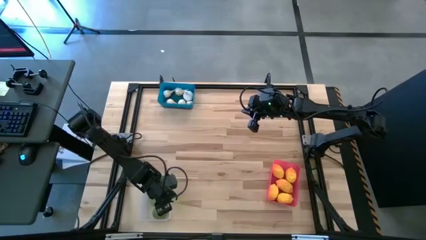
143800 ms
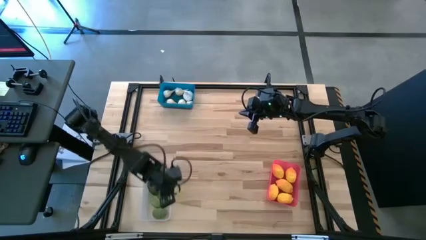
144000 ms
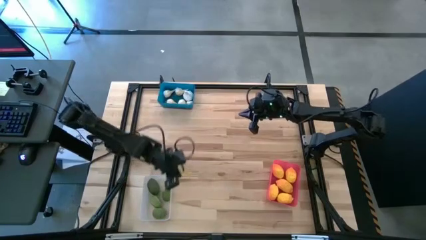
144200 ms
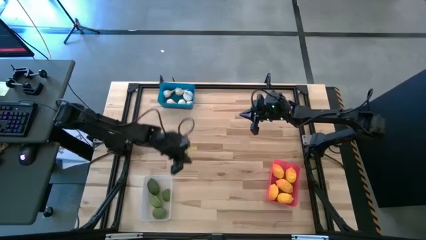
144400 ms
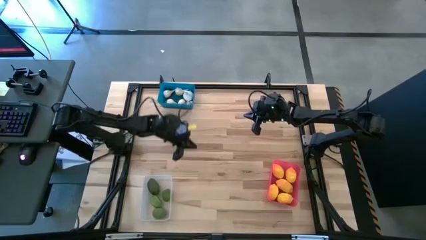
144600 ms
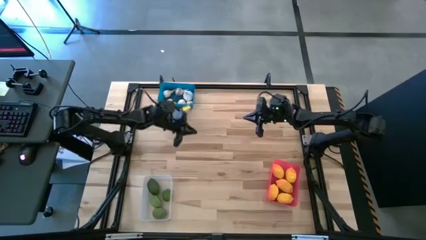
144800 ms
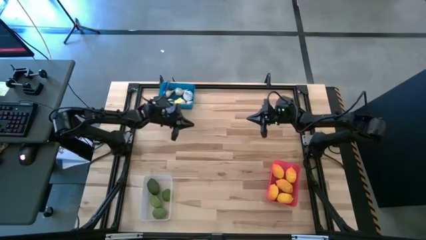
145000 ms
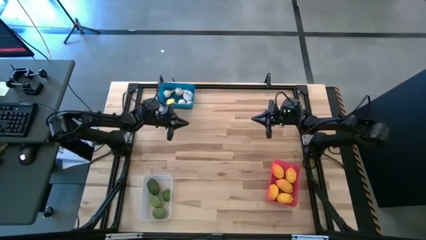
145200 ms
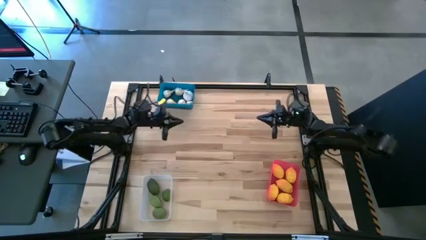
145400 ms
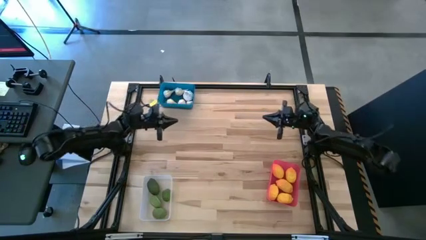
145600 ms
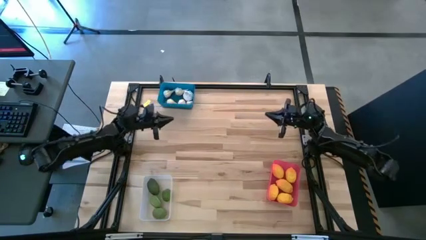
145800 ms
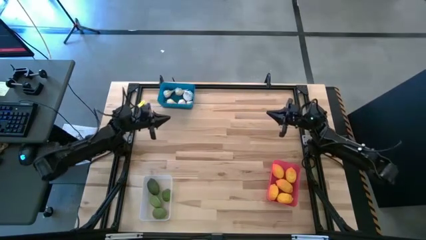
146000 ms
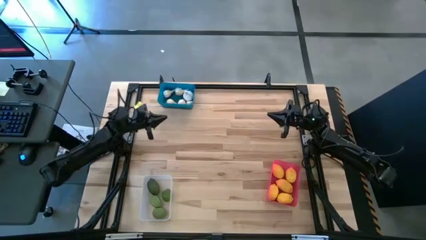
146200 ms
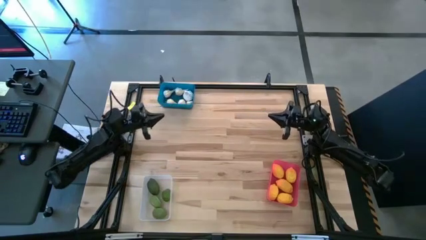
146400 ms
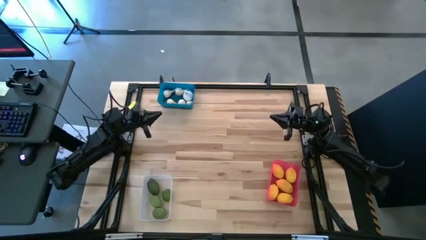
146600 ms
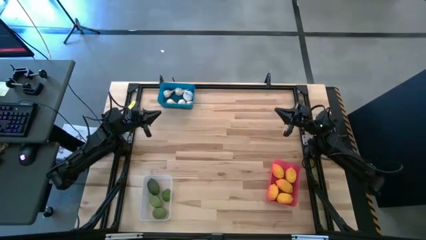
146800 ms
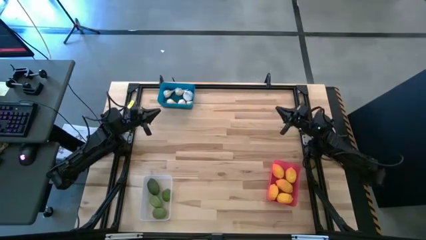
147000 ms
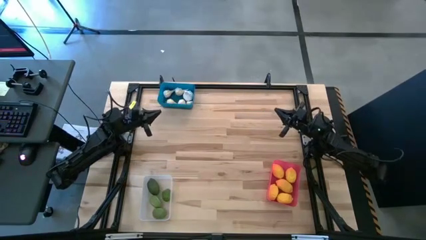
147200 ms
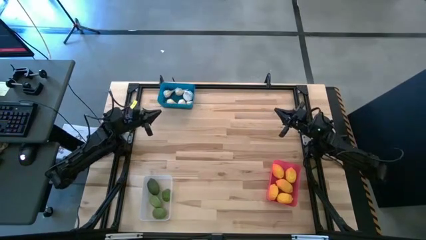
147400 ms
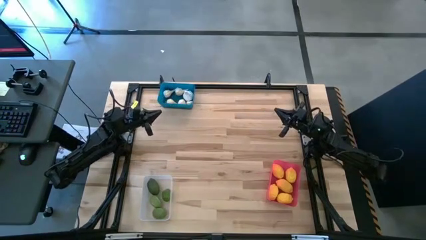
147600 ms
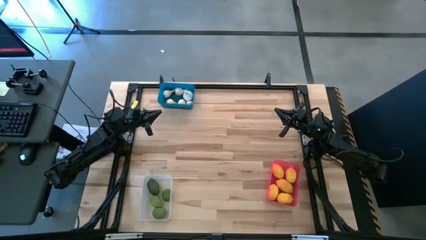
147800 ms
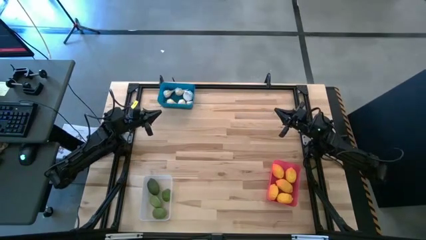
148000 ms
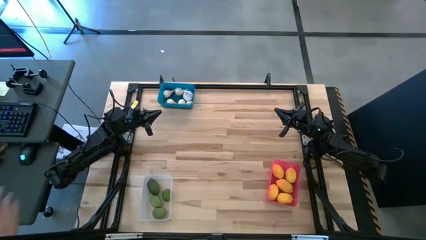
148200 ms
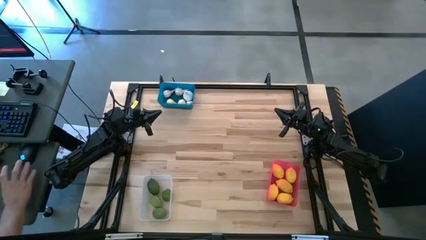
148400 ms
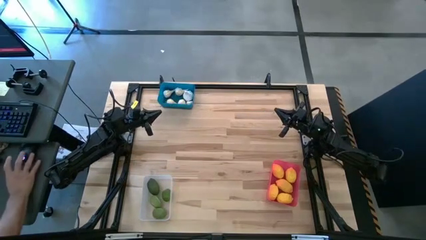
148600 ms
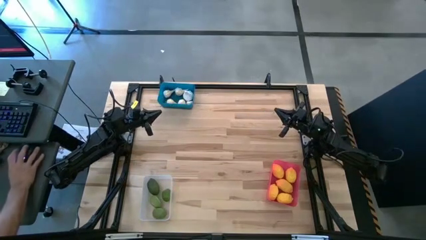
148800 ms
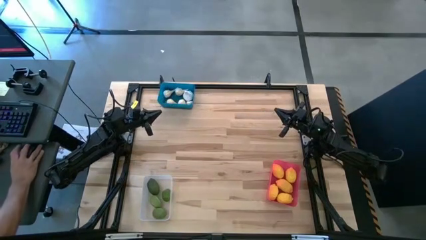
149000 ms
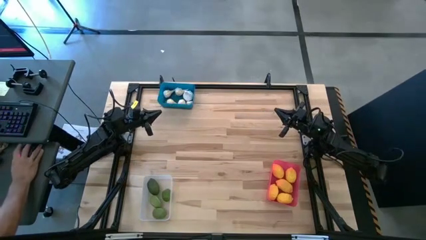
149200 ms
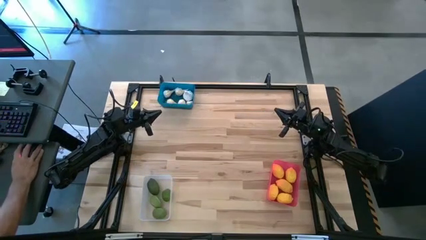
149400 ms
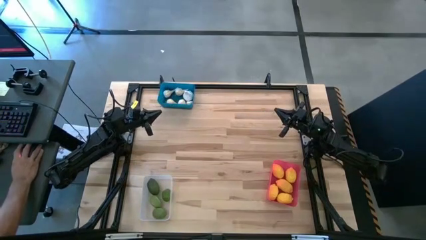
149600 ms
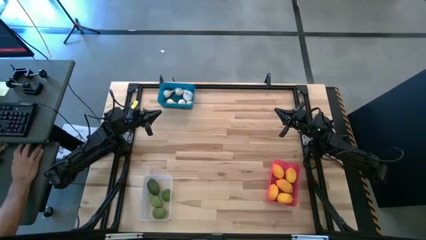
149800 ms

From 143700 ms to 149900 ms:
Task: Sort produce into baskets
Return to Home Position

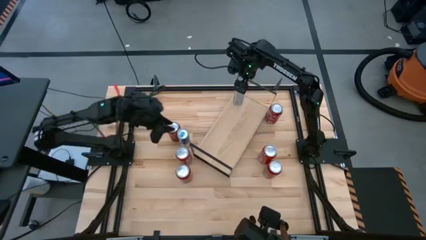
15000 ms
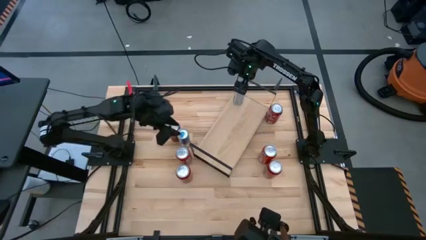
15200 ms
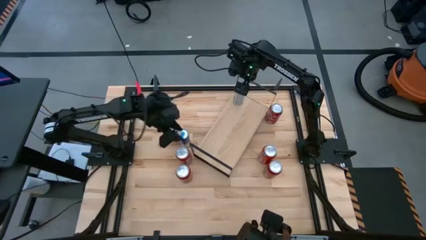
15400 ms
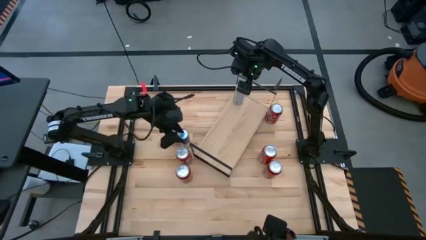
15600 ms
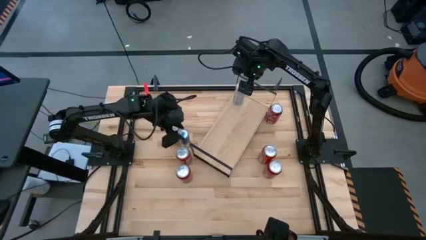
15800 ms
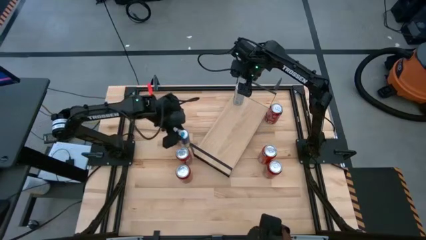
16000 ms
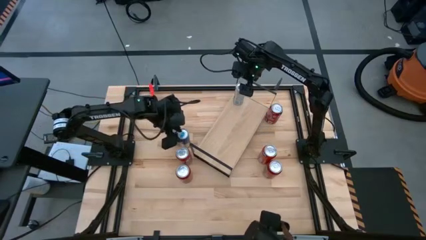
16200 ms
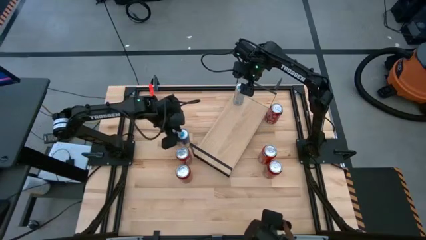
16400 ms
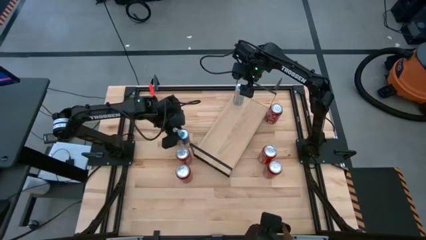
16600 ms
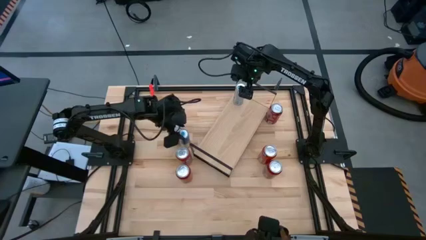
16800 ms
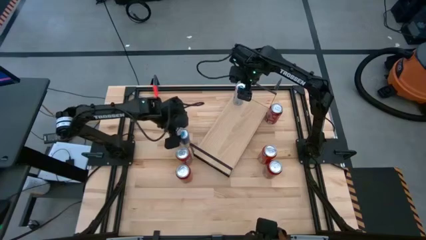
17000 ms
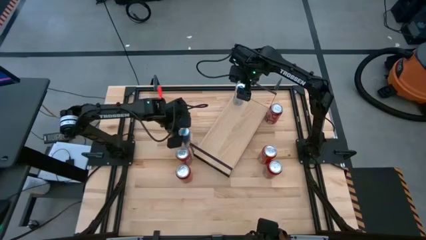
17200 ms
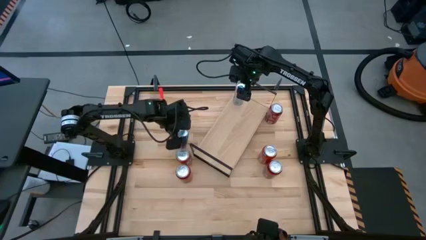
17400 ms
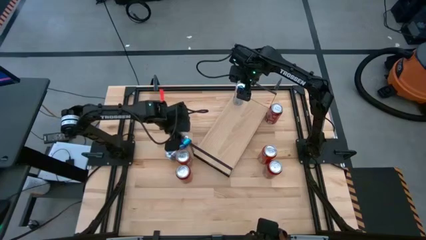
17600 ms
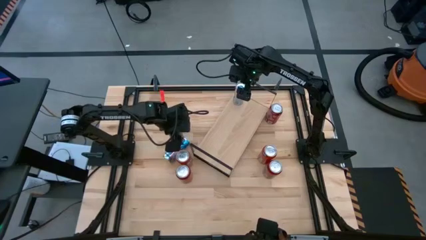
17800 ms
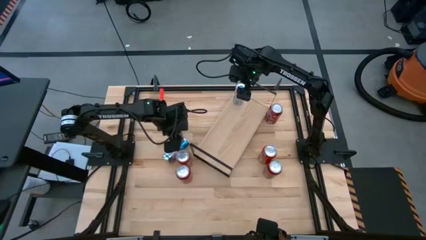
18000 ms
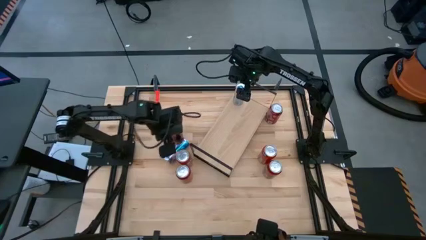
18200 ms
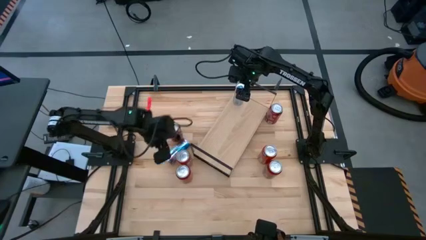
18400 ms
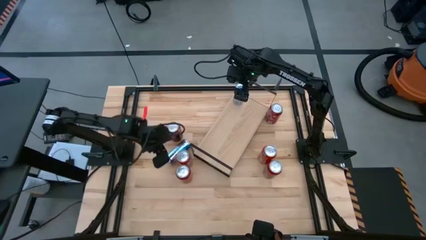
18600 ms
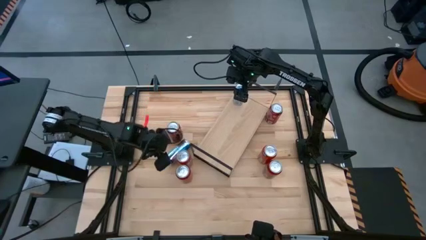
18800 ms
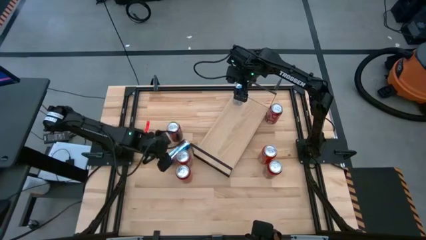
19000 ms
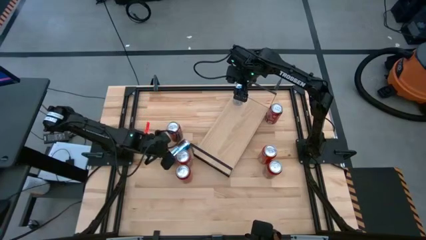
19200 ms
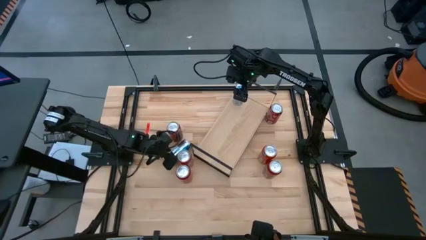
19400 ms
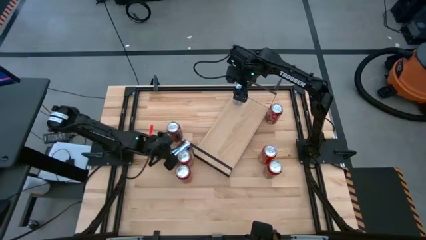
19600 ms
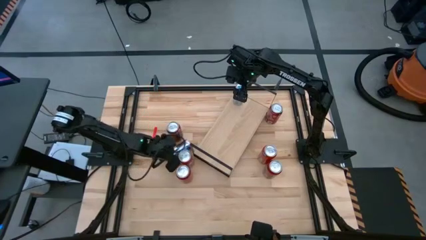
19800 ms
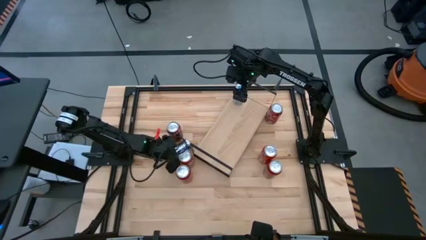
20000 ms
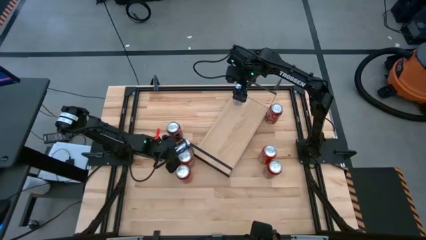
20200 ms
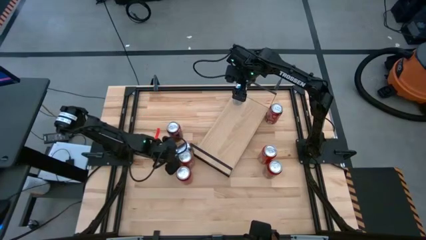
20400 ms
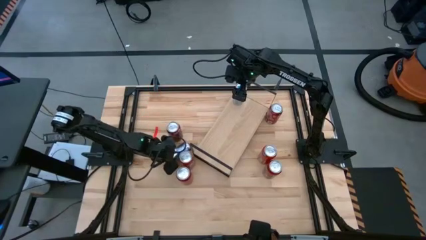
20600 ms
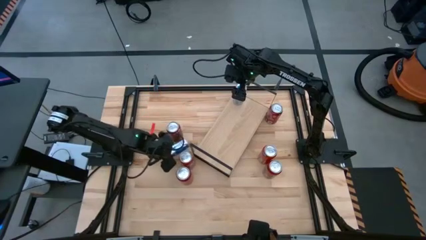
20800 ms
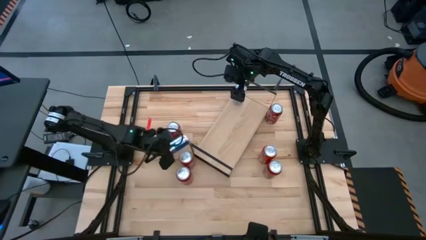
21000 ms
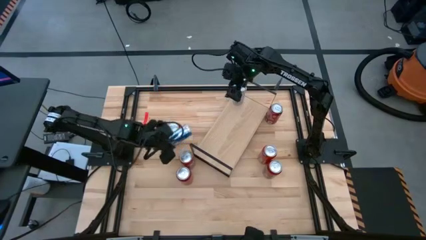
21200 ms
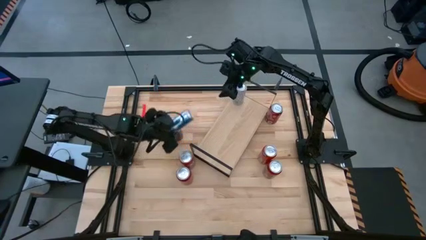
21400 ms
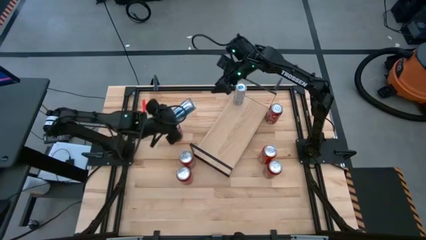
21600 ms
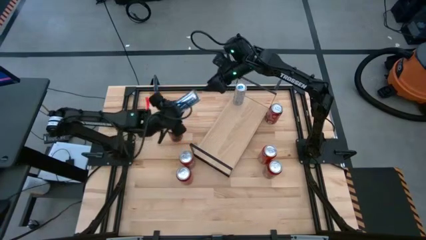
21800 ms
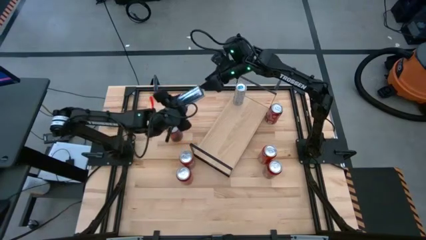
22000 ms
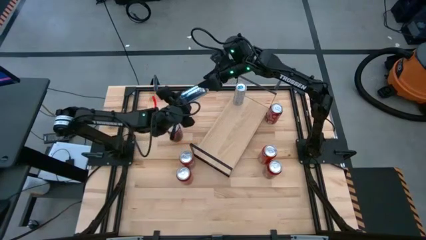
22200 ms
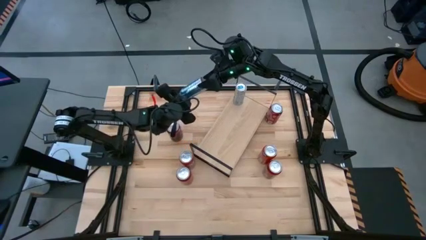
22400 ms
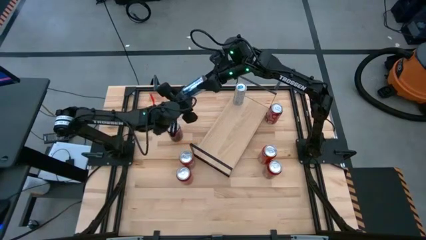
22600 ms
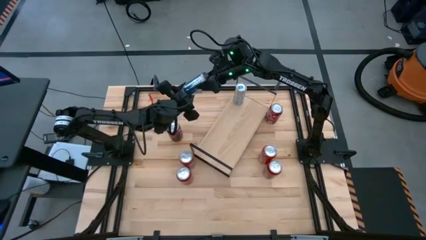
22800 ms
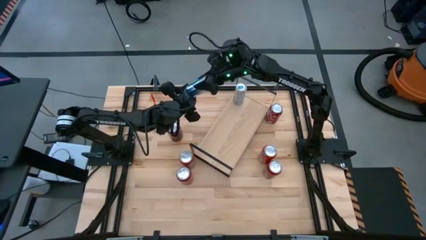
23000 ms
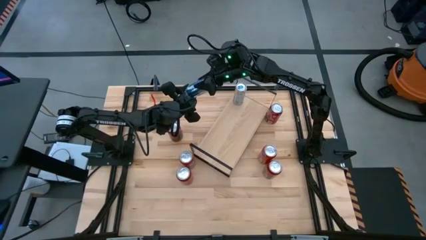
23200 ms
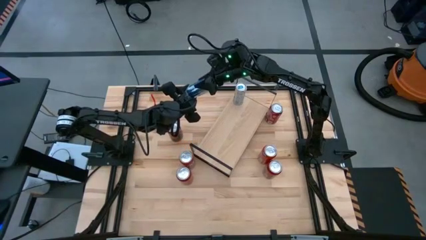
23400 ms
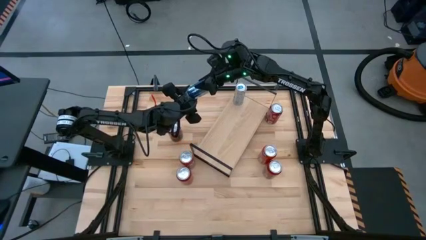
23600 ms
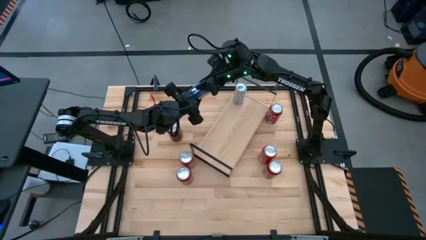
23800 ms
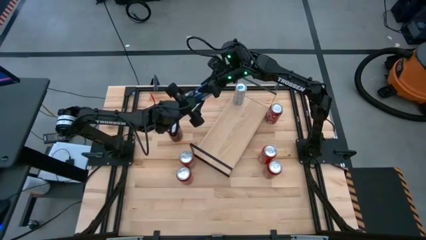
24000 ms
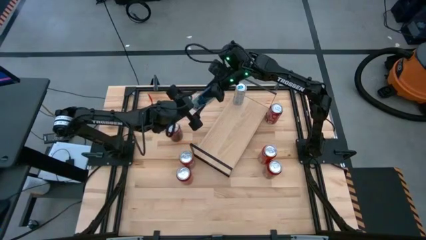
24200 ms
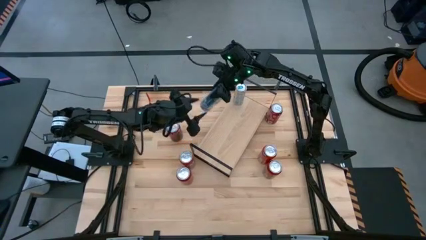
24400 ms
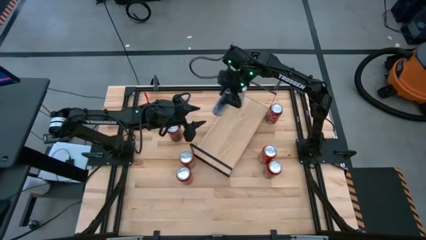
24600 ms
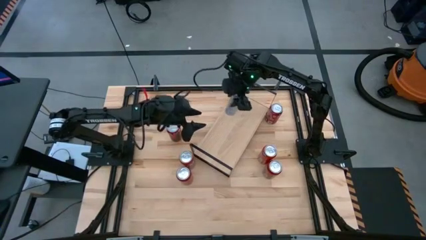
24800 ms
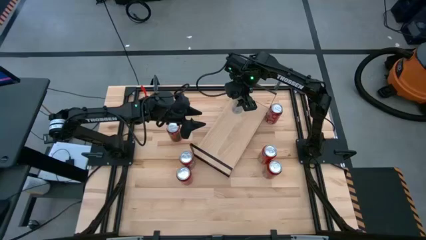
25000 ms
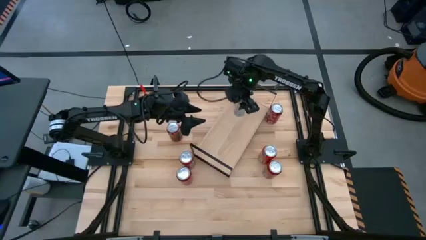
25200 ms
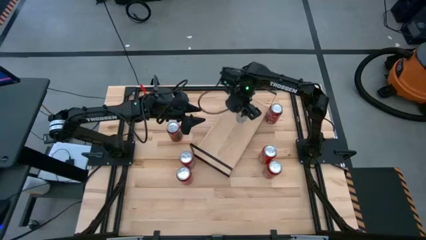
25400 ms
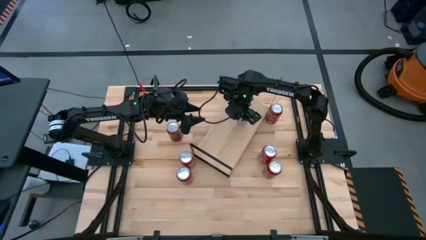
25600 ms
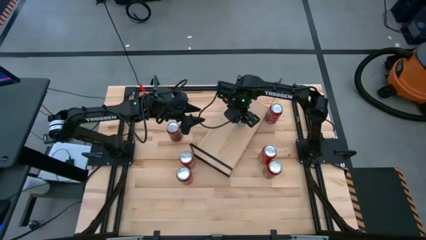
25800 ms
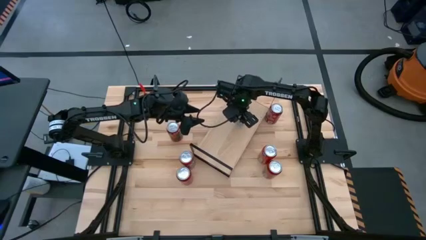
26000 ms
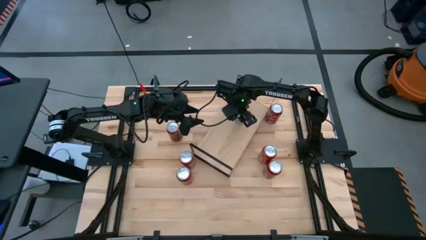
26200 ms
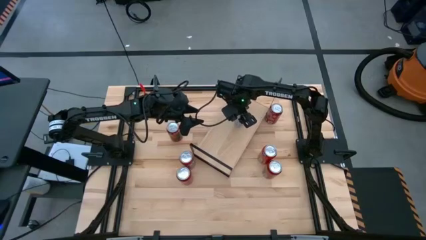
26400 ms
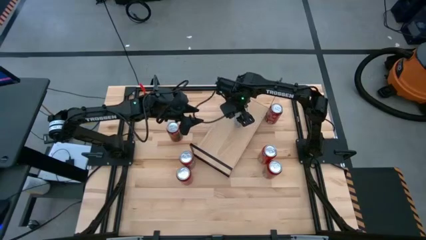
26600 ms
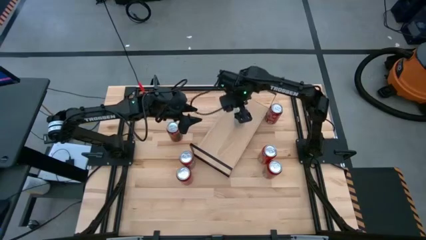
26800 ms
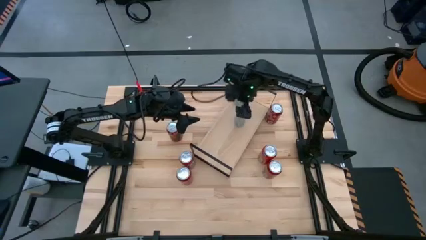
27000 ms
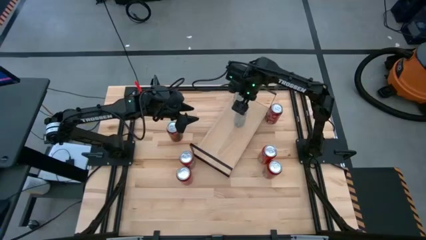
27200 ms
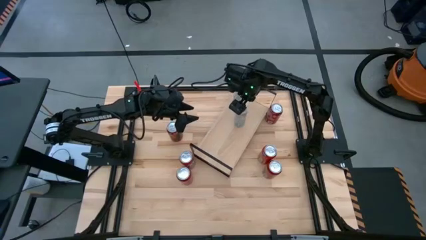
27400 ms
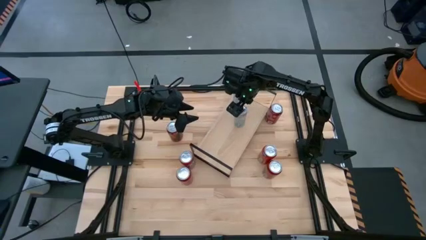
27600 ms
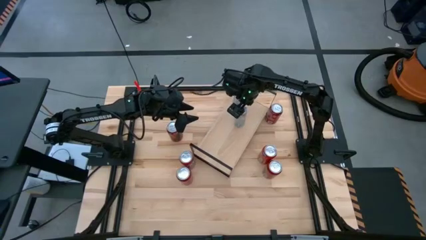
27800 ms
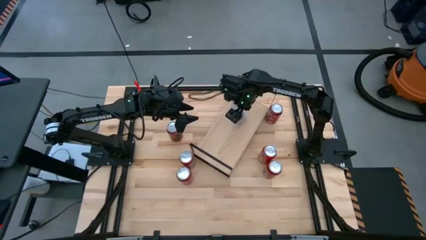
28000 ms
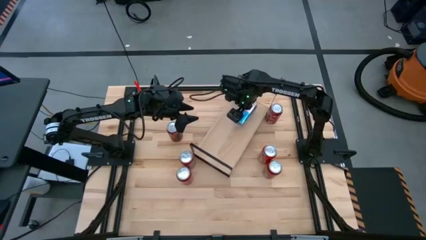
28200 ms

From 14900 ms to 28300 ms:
Task: Place canned beverage on shelf
Put the blue soda can on the shelf aligned with the other blue soda can
